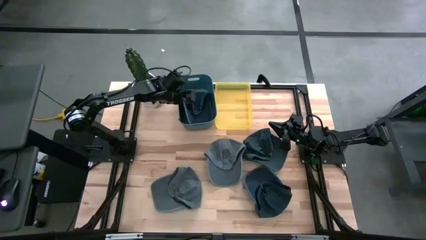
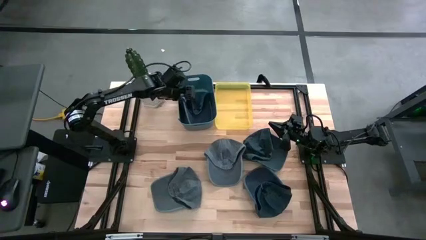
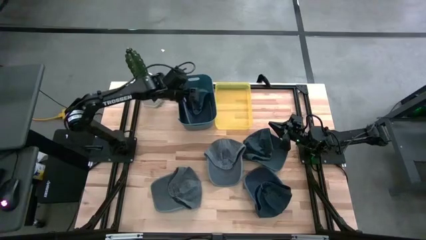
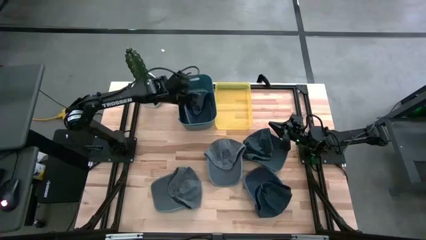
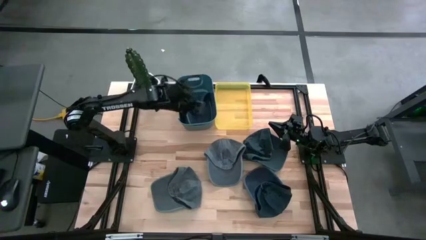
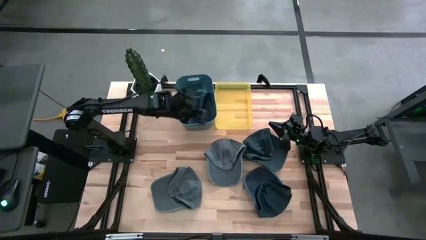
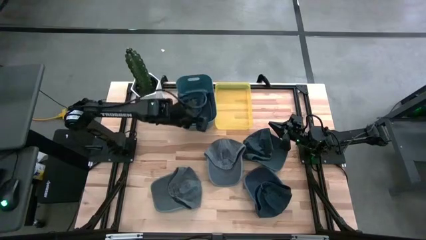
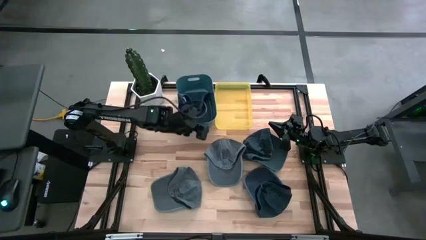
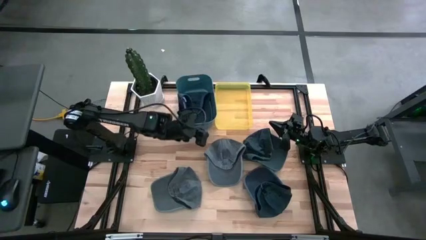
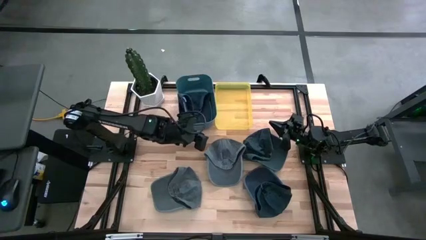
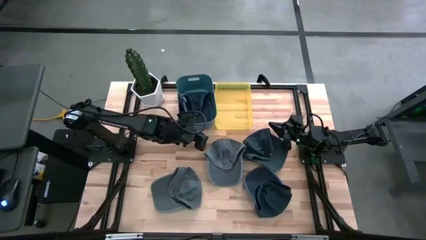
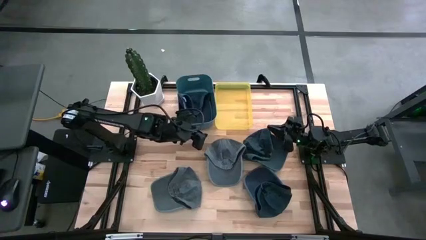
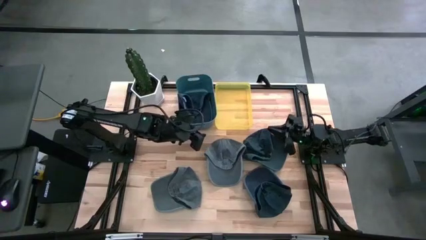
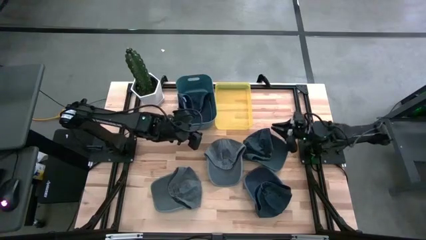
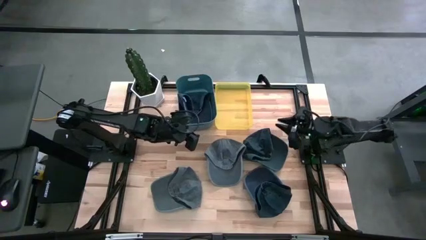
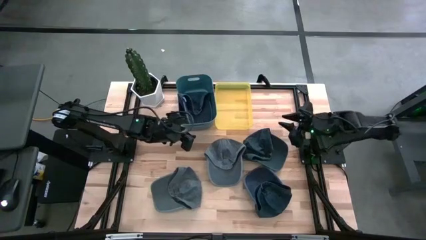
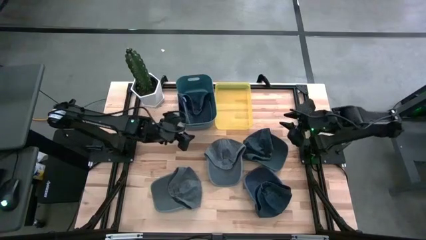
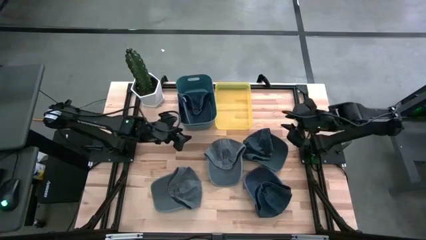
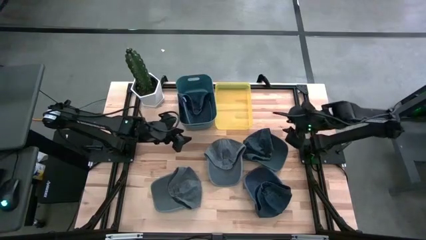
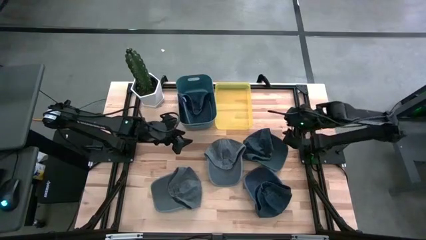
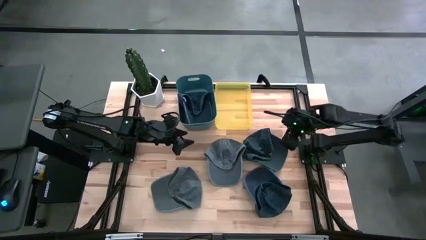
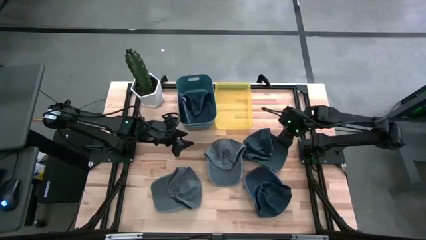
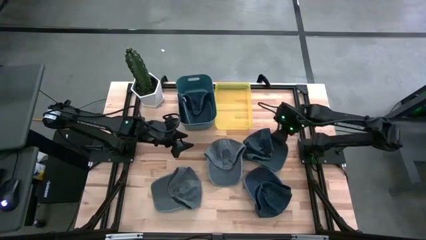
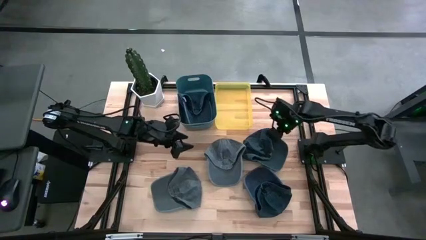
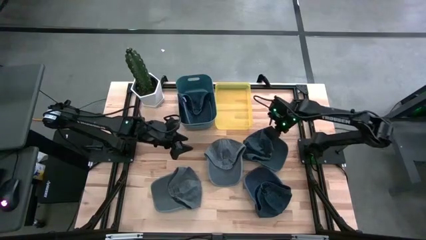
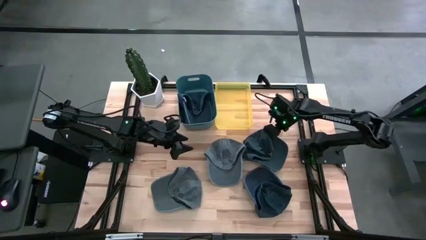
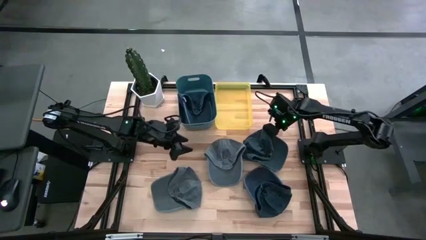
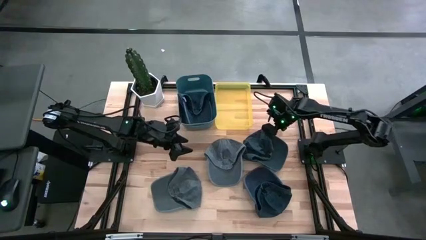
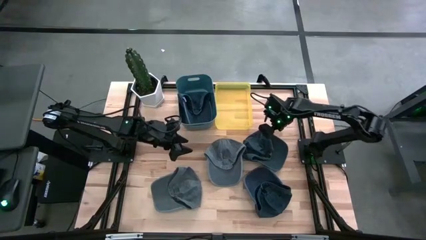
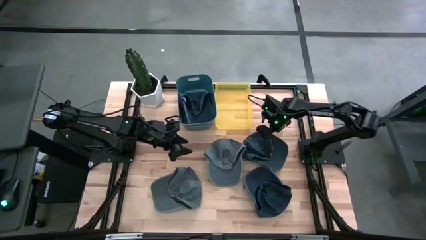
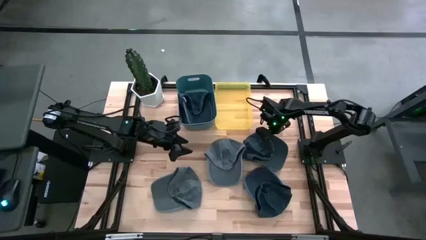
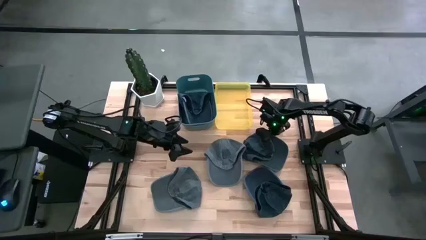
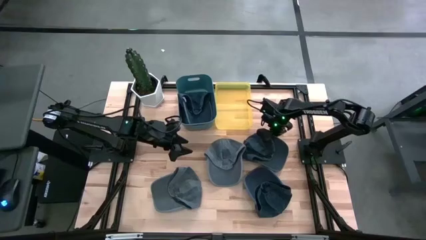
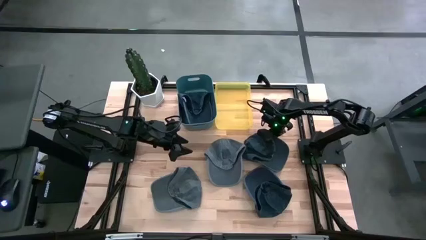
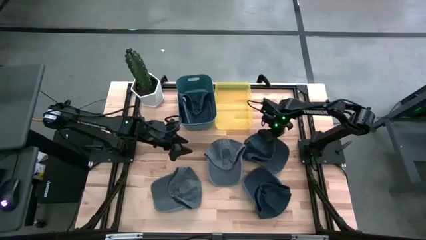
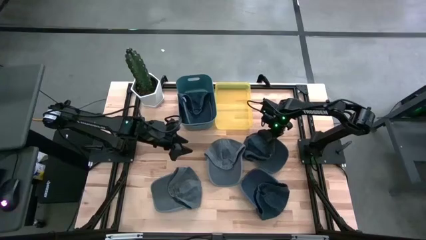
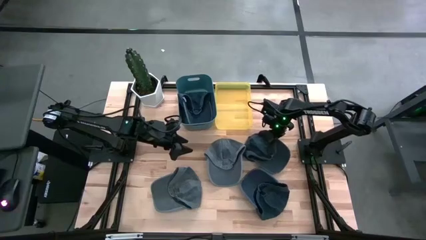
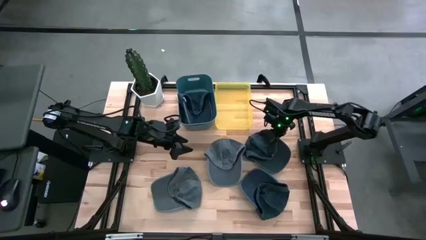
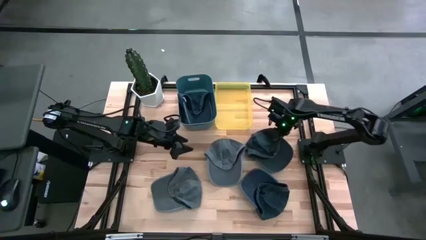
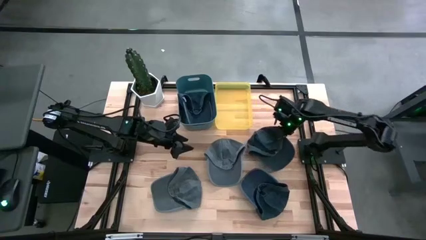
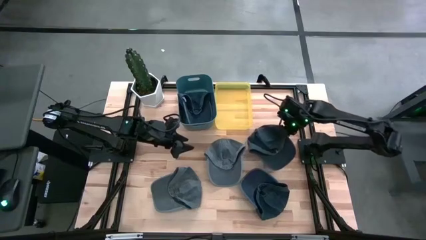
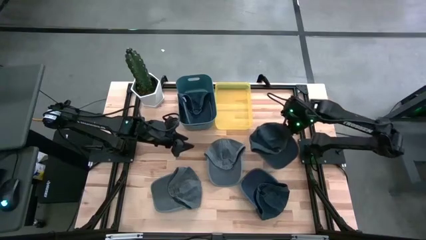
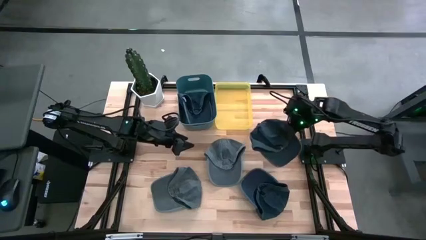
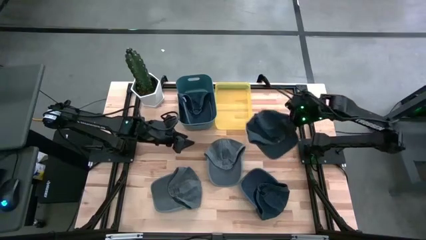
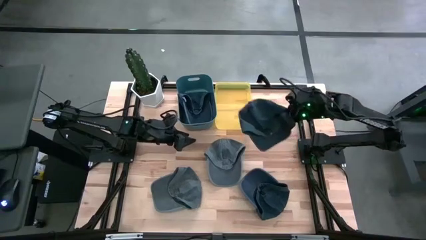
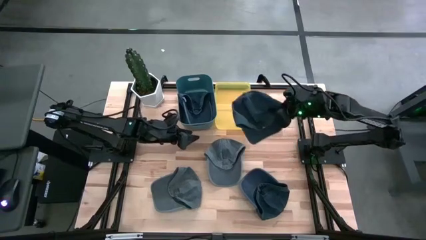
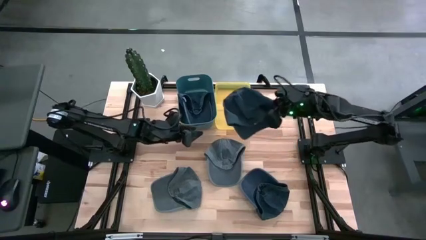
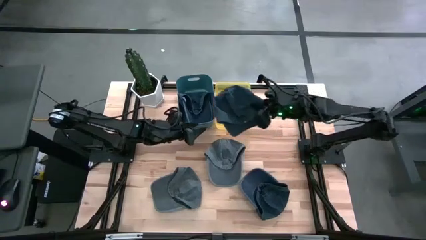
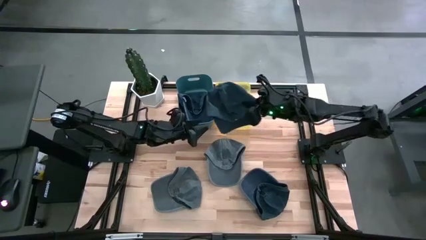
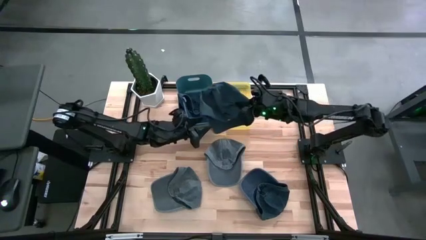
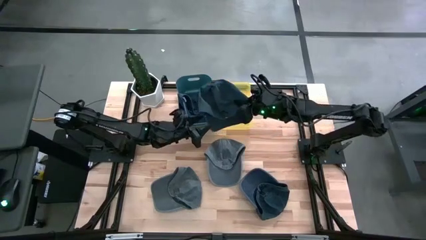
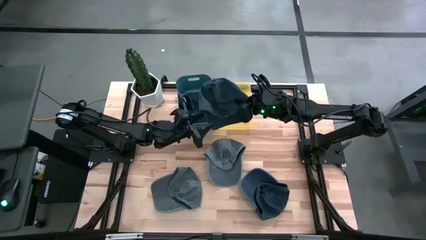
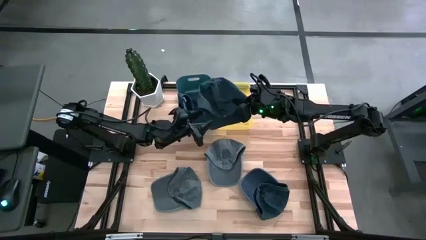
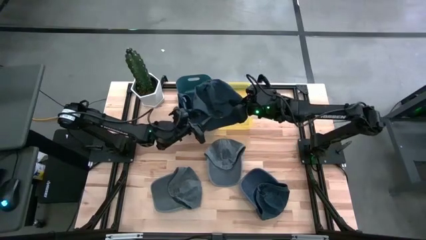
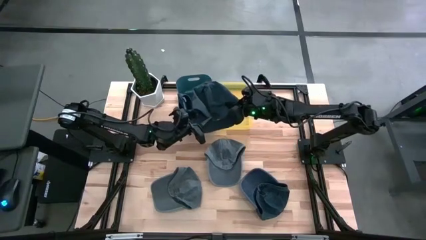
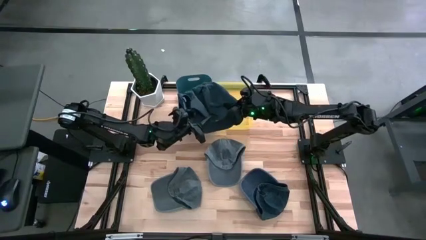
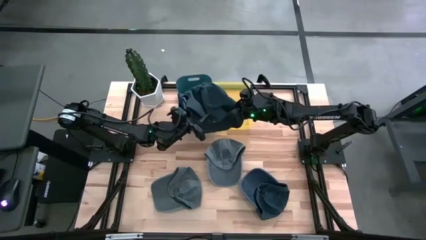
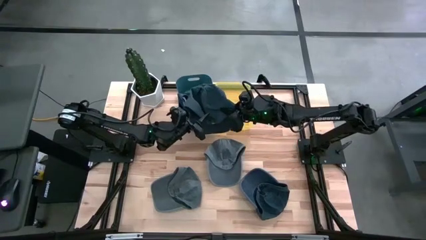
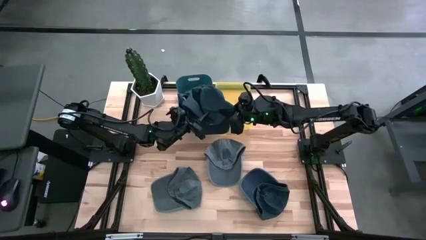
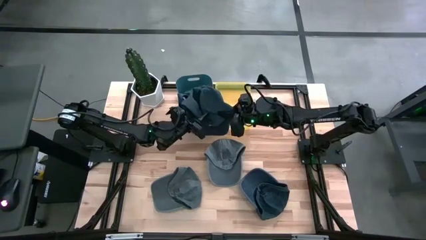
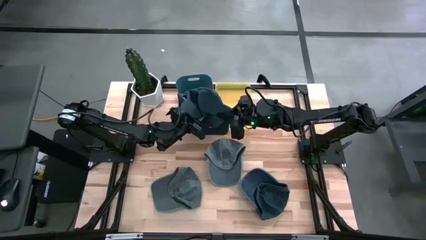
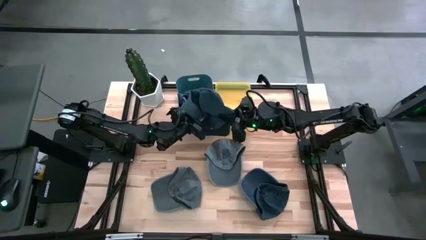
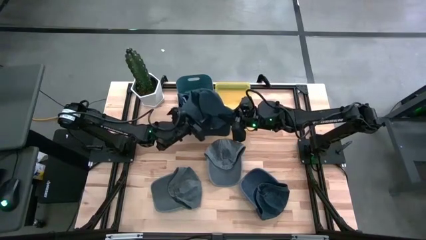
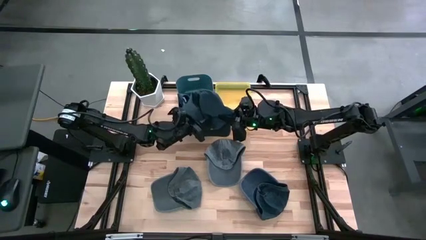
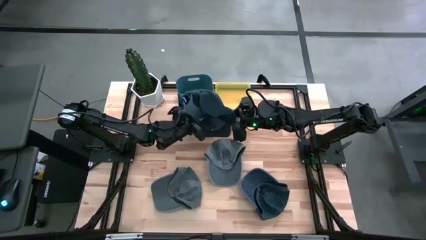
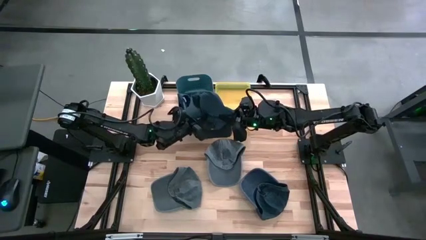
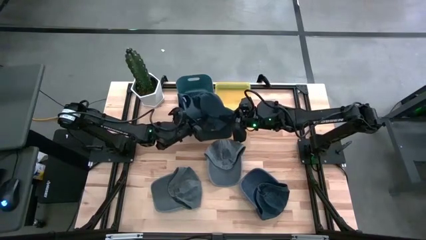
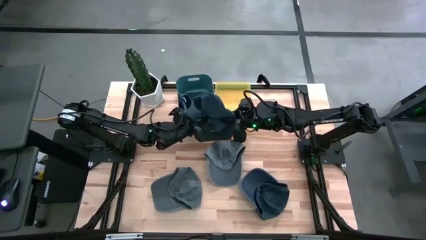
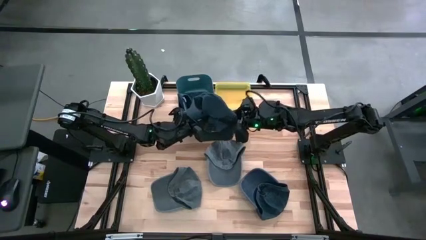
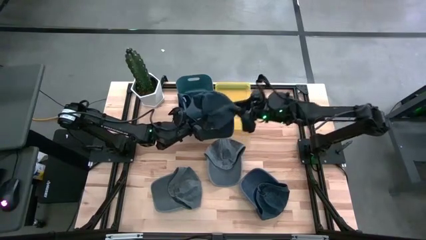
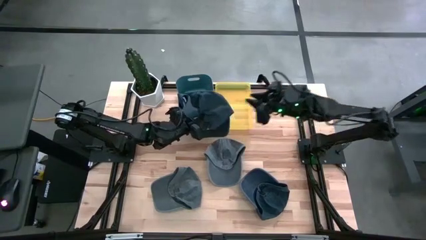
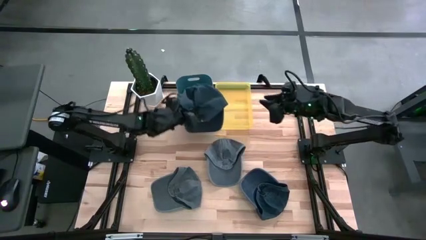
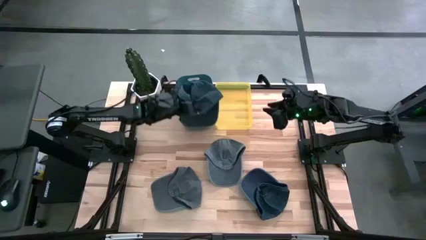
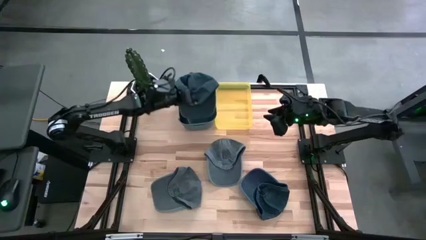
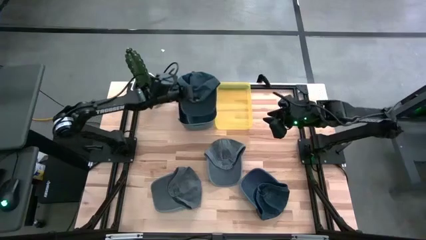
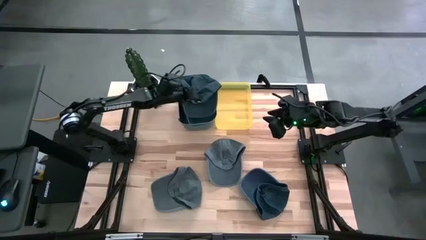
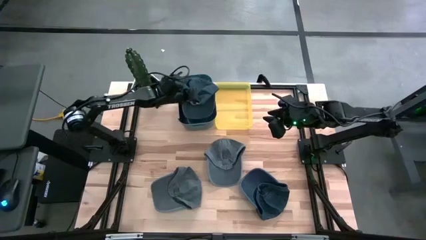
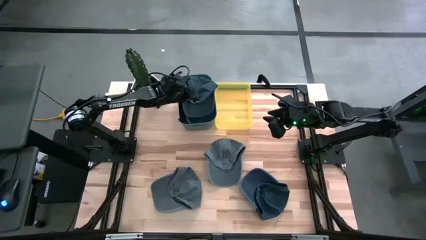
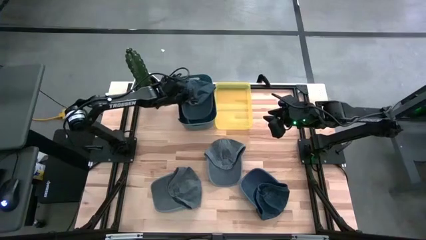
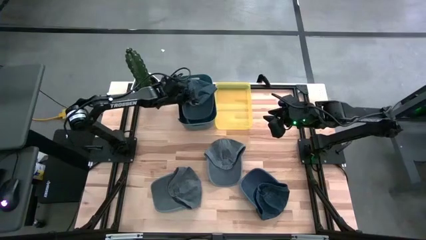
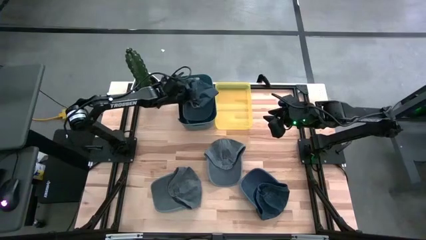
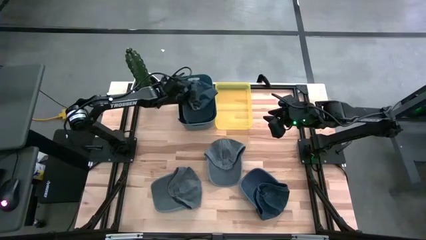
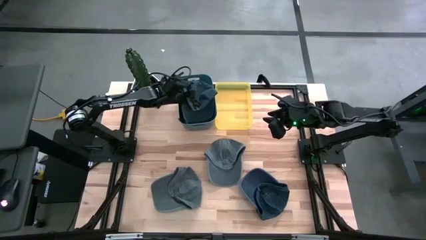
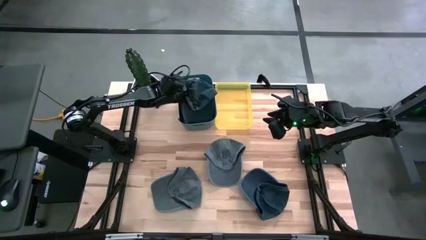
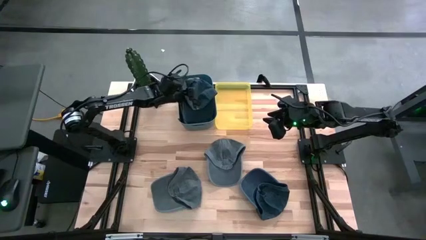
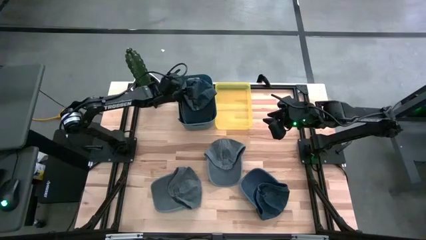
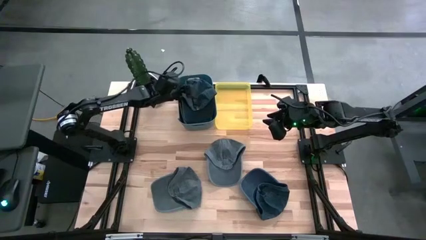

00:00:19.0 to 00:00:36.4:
Task: Pick & Place hat
Put the top blue cap into the blue bin
